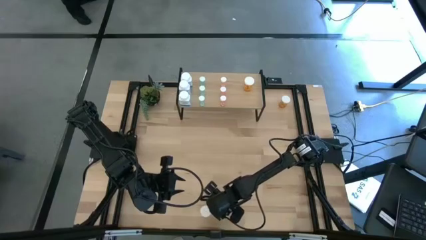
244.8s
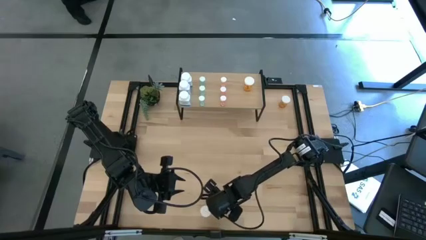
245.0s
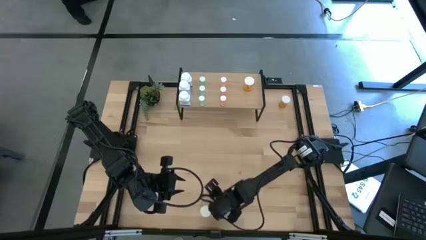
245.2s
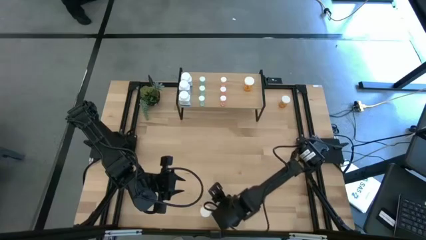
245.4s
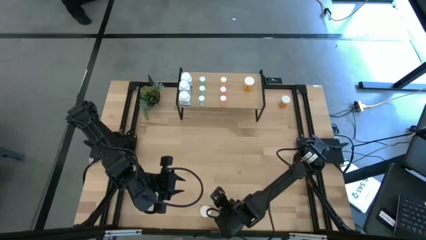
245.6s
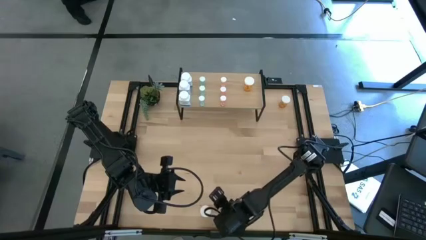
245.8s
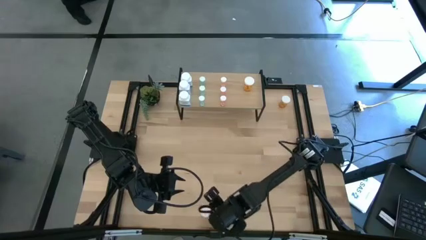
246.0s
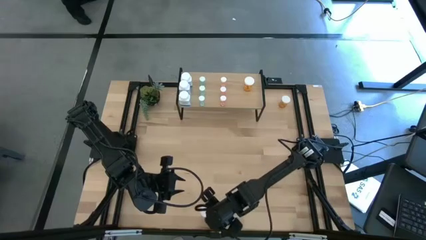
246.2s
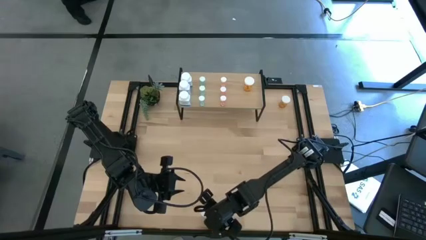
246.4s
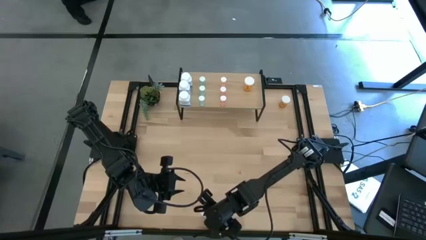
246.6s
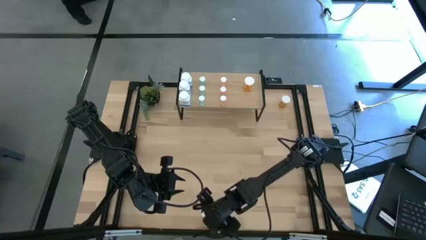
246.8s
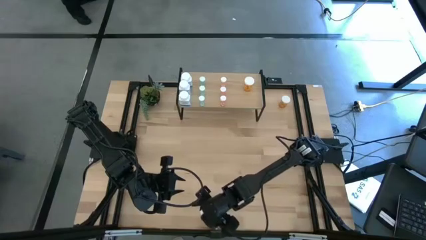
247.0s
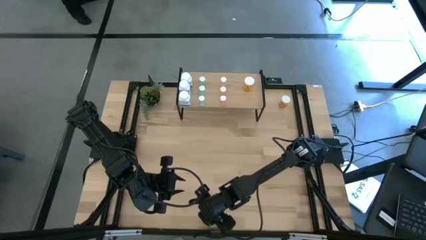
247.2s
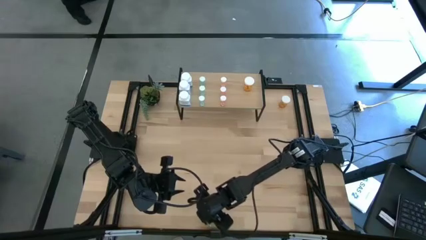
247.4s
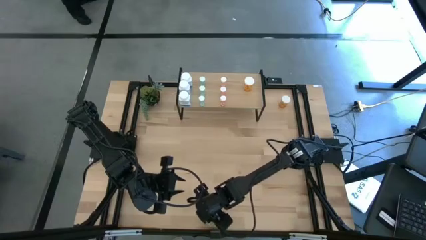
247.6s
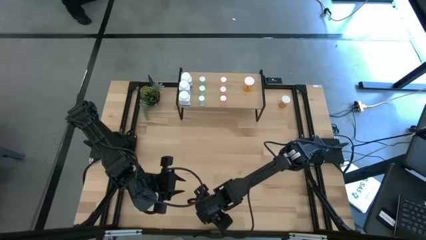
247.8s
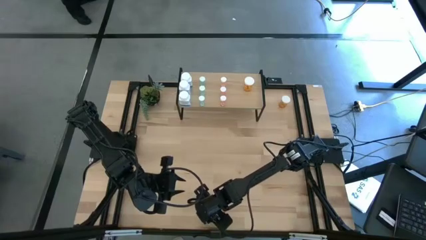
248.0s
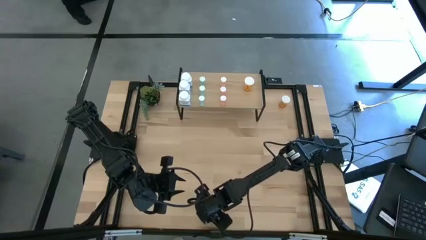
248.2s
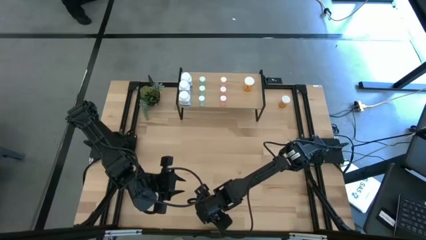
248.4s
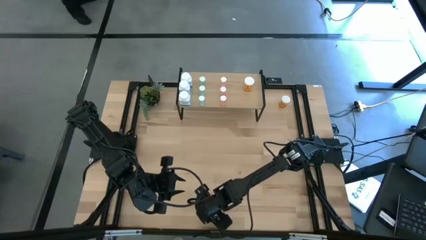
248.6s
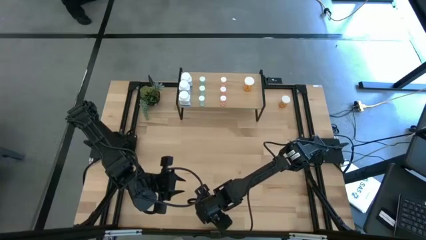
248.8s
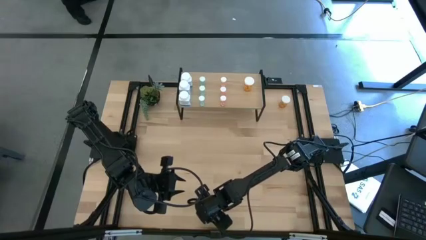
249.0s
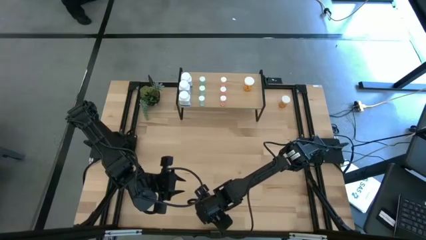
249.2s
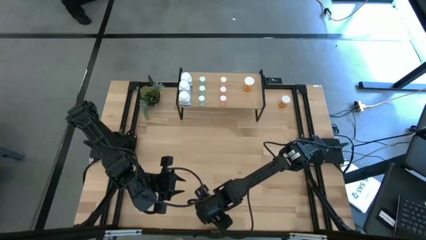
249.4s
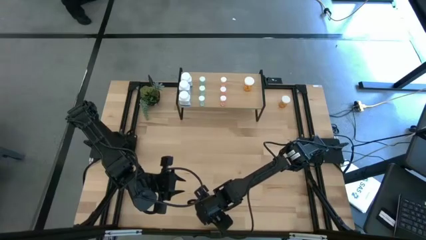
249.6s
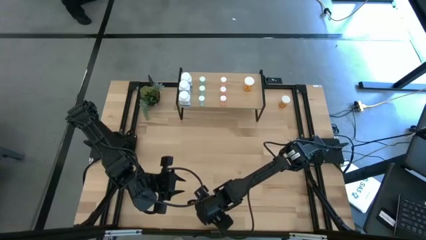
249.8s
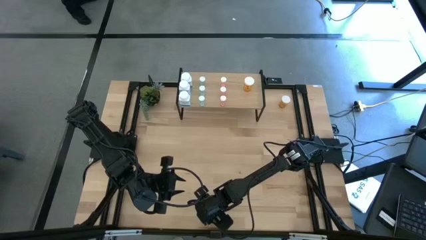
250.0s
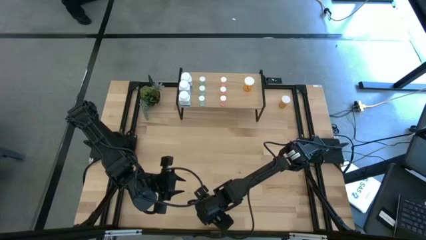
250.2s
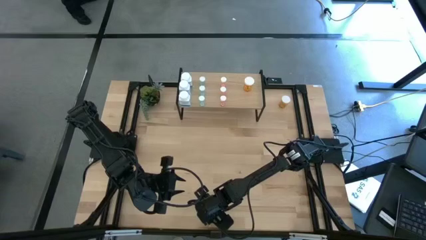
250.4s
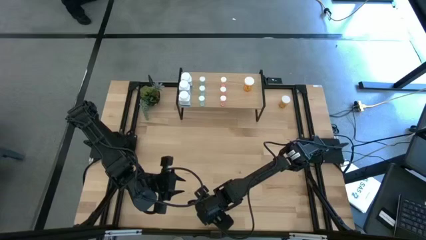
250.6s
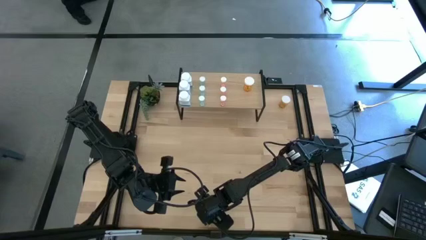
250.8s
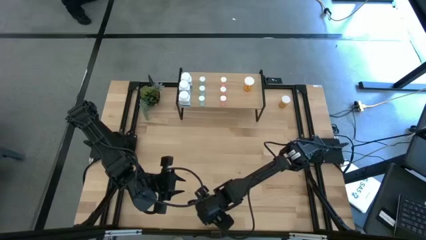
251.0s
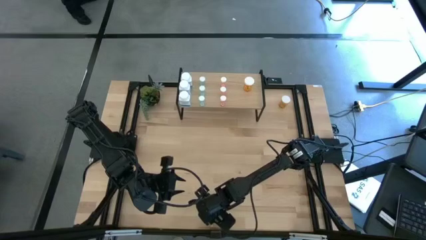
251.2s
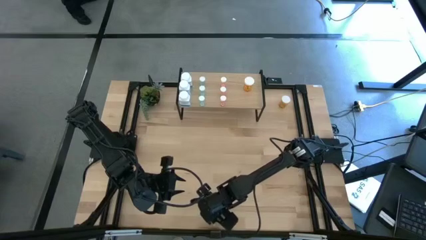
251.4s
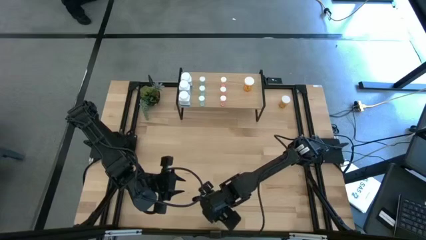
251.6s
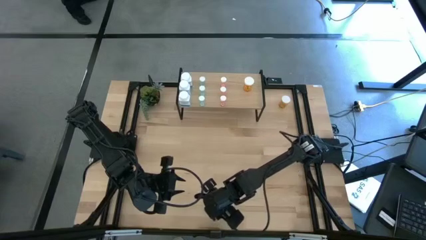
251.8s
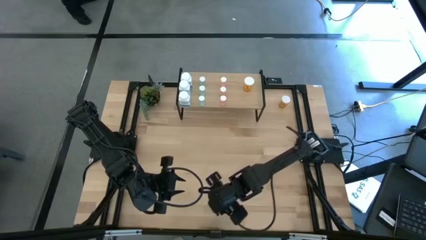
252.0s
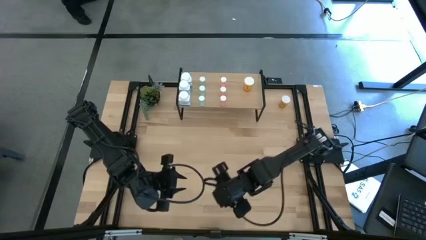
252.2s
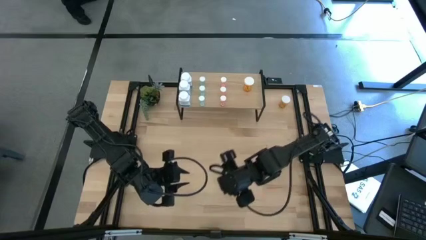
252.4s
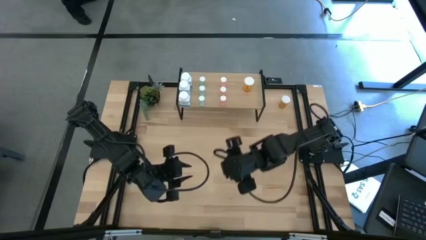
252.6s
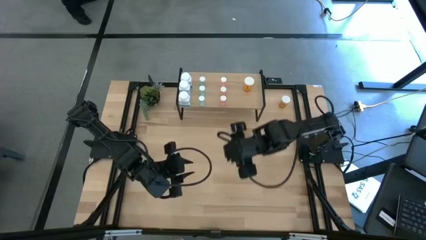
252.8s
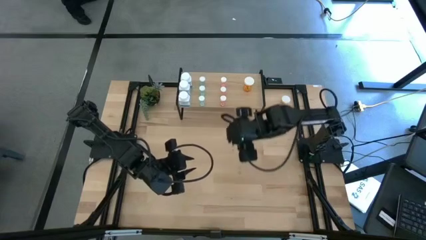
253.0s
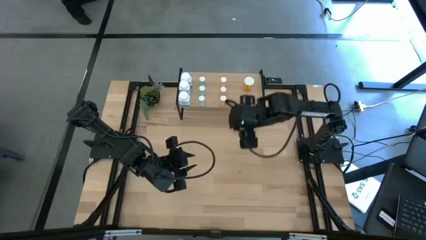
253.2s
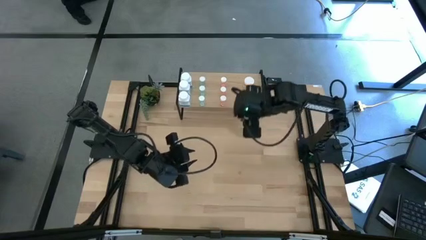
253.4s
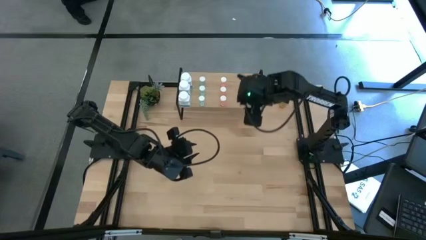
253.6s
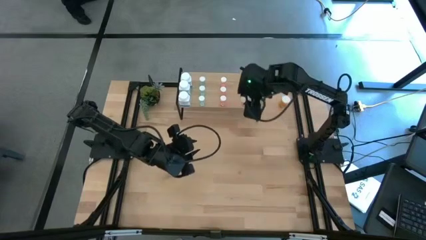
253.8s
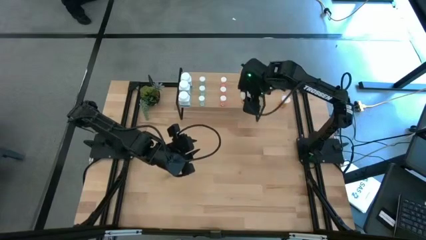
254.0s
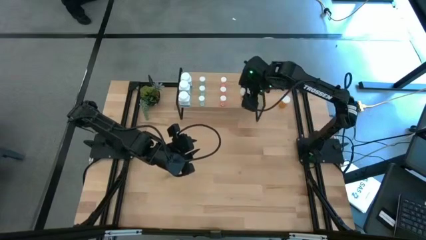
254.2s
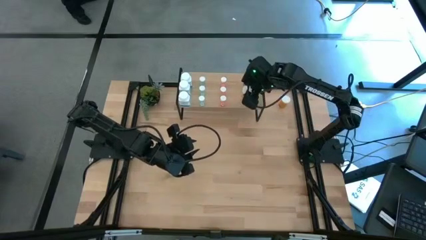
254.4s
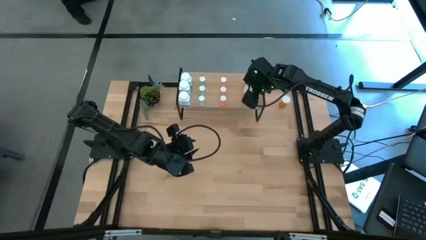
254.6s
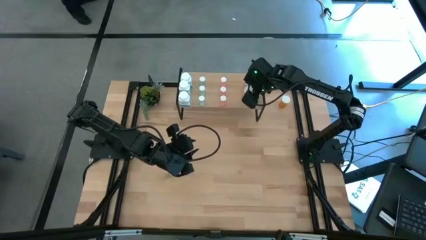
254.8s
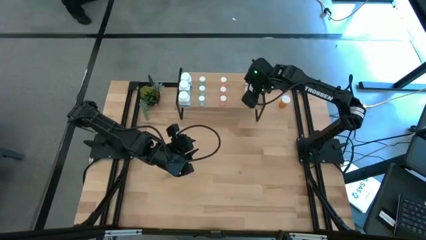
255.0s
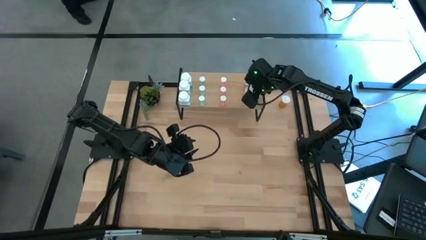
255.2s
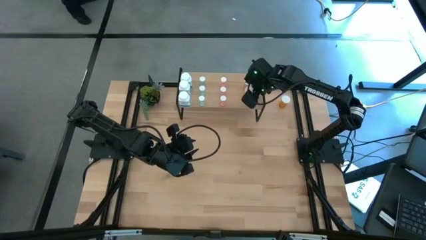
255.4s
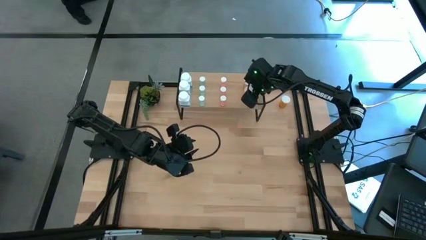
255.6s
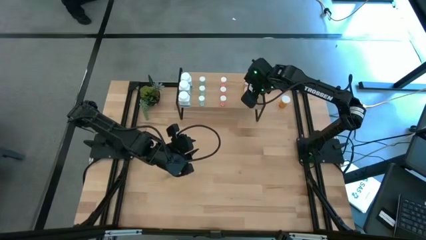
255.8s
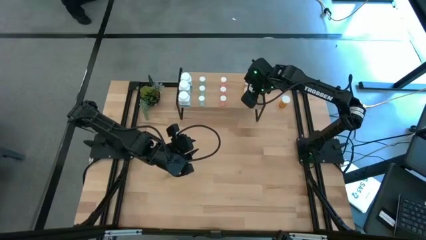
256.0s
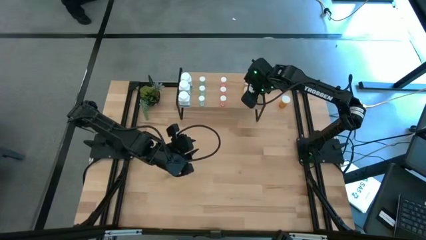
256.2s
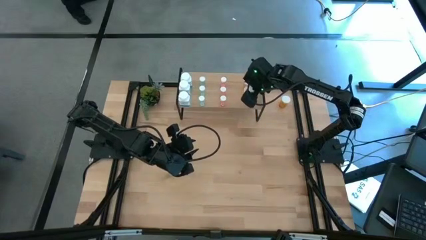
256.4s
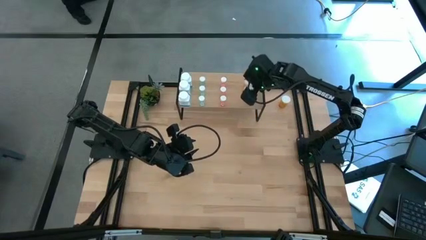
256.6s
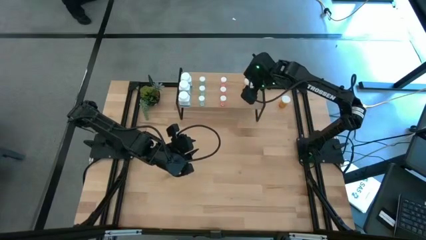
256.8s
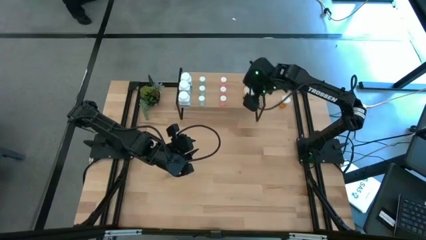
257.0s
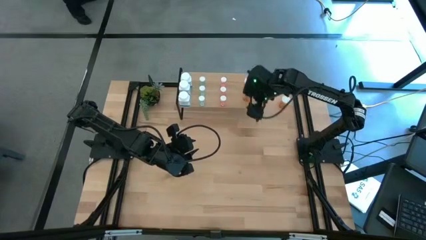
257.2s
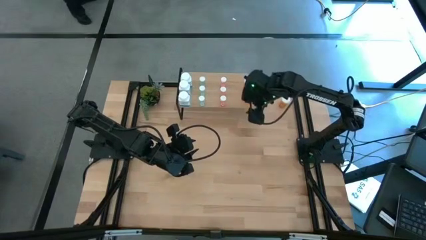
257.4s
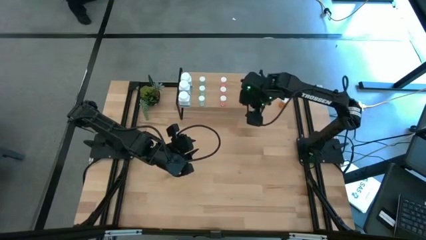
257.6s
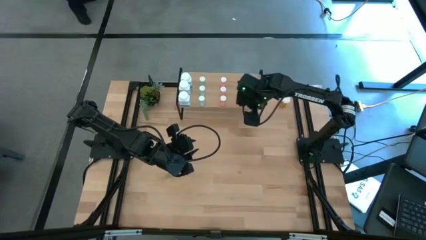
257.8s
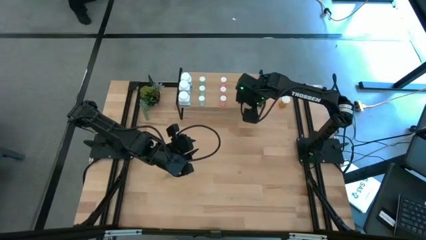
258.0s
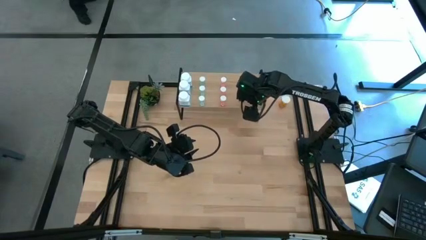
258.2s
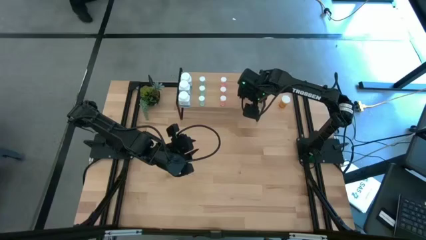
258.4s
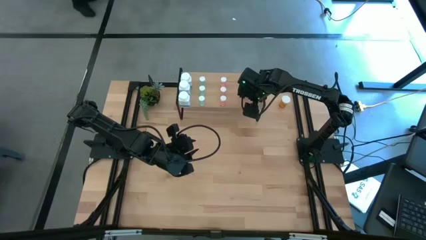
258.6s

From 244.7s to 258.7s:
Task: Pick and place medicine bottles onto shelf by color
Put the bottom orange pill bottle on the shelf aligned with the other orange pill bottle

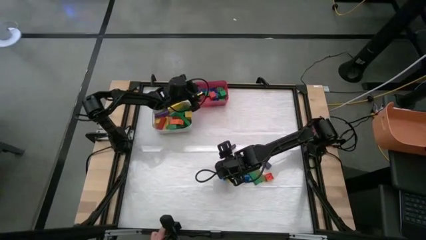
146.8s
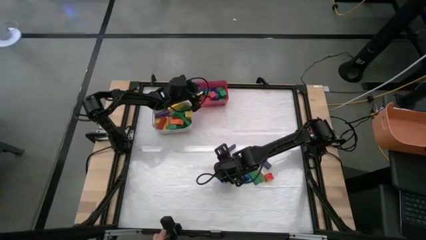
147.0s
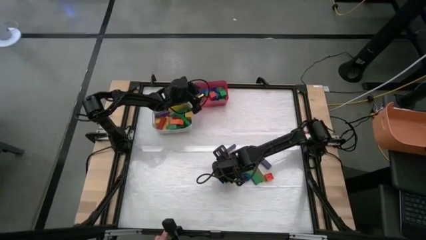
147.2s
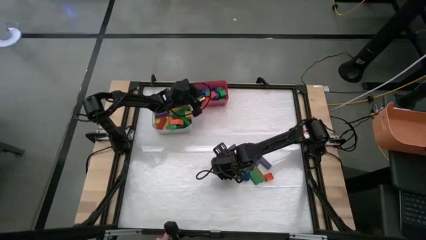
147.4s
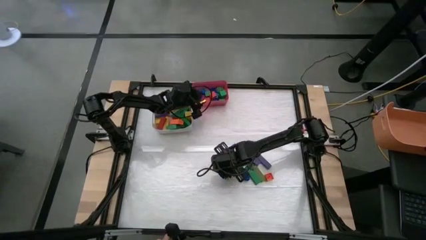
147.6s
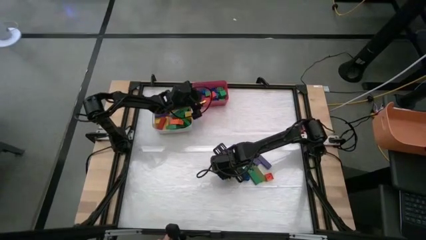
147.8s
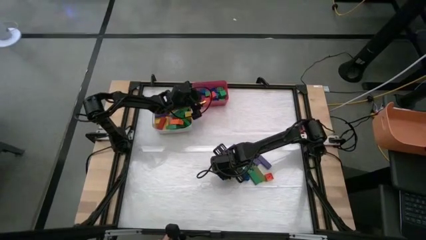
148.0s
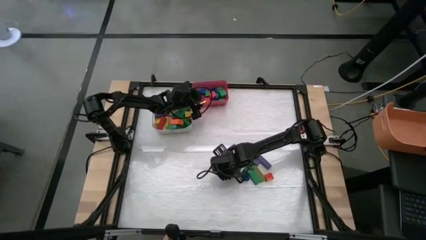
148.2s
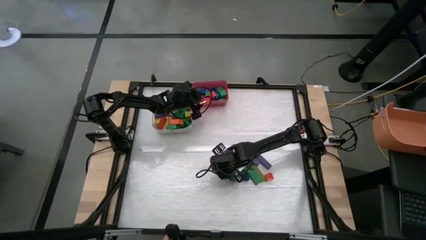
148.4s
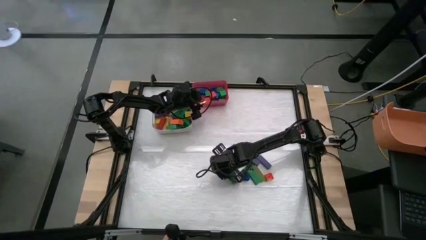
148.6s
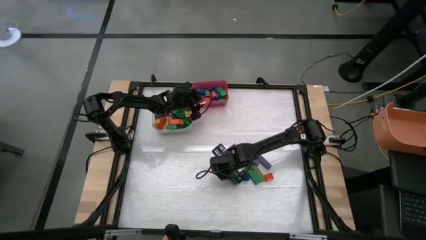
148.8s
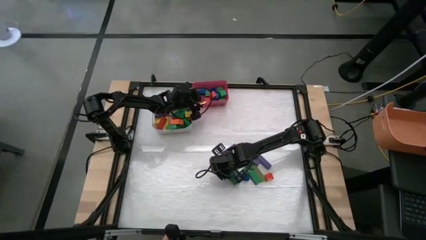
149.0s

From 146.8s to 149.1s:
Task: Sort blocks by size
Put the small green game piece into the red bin
